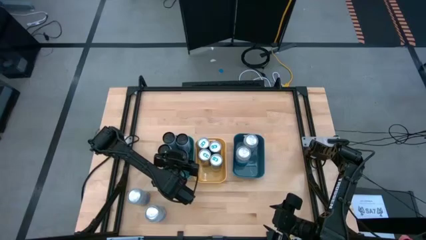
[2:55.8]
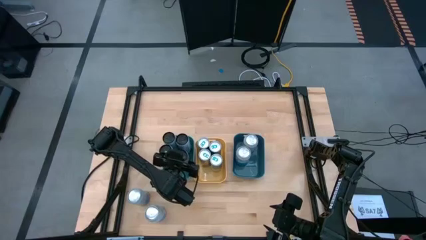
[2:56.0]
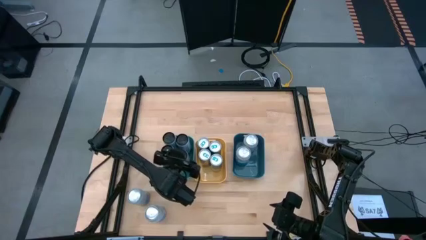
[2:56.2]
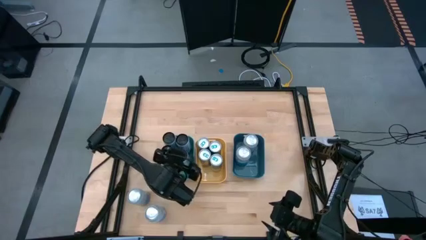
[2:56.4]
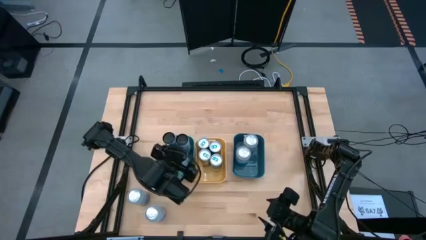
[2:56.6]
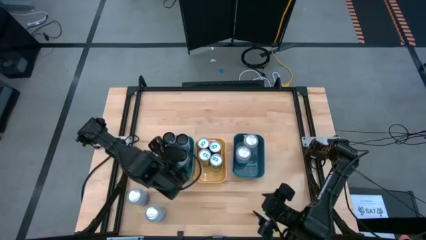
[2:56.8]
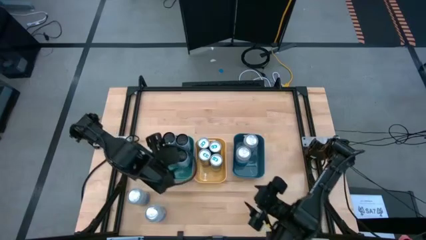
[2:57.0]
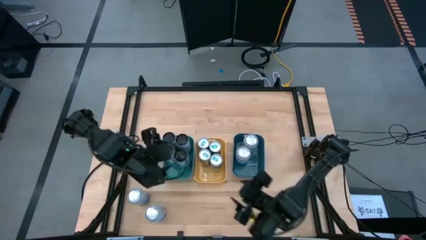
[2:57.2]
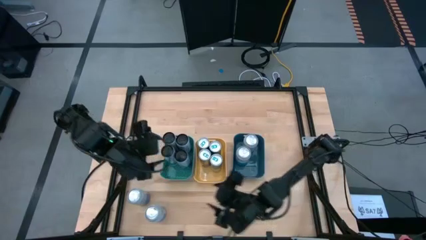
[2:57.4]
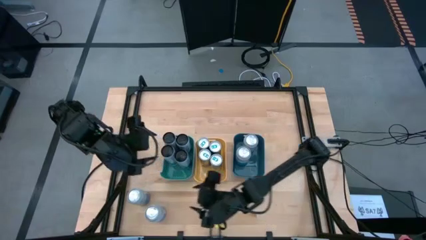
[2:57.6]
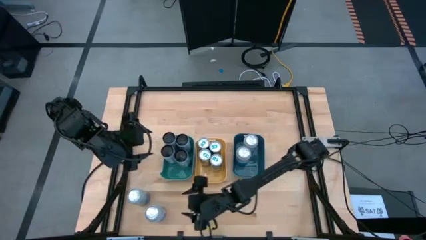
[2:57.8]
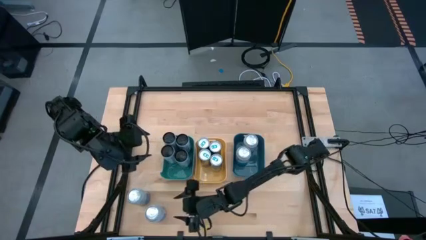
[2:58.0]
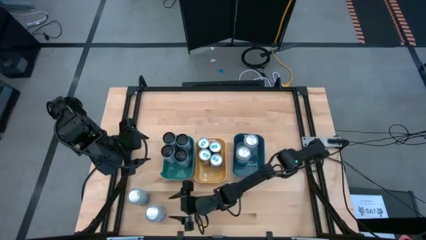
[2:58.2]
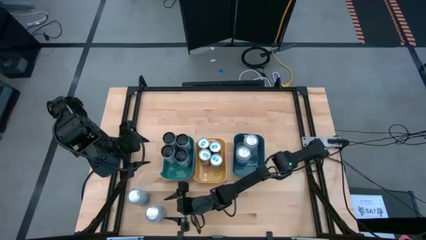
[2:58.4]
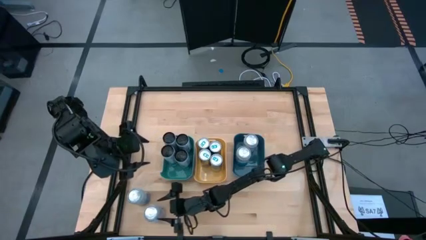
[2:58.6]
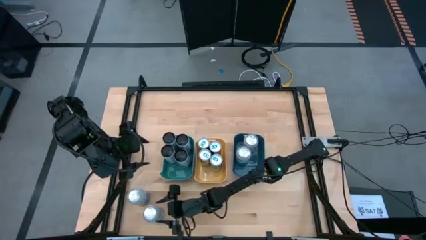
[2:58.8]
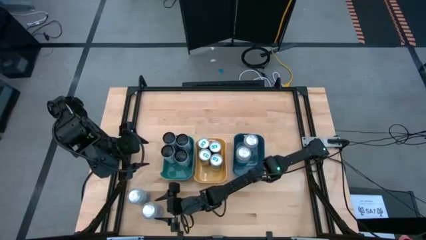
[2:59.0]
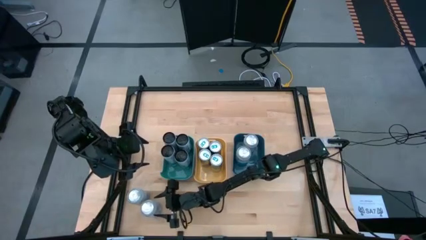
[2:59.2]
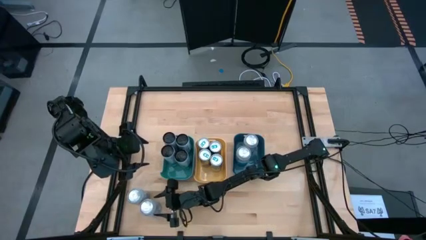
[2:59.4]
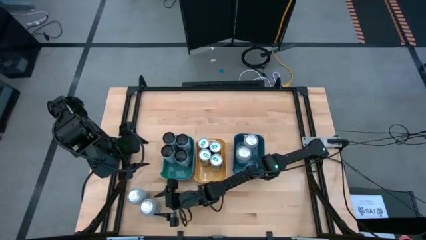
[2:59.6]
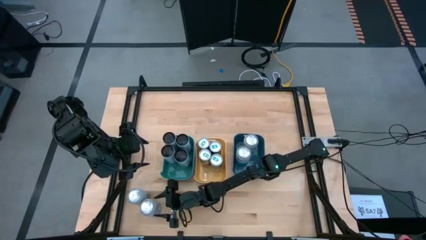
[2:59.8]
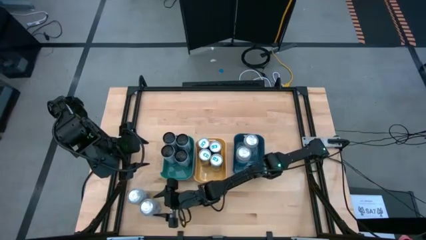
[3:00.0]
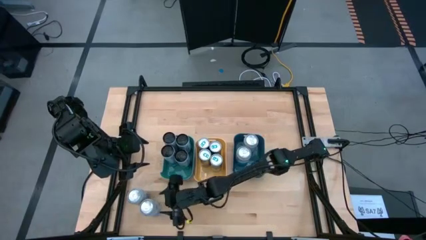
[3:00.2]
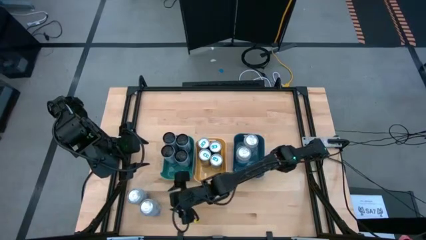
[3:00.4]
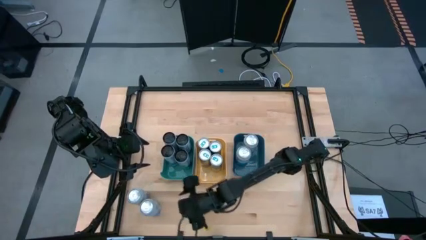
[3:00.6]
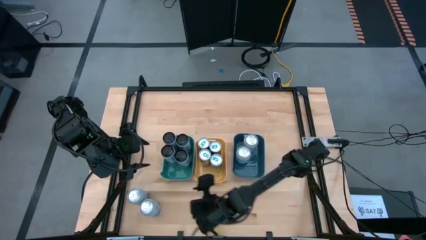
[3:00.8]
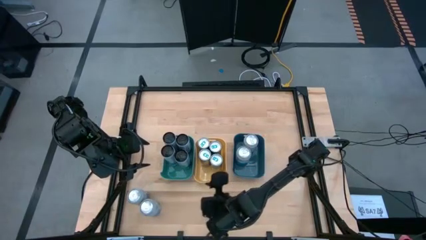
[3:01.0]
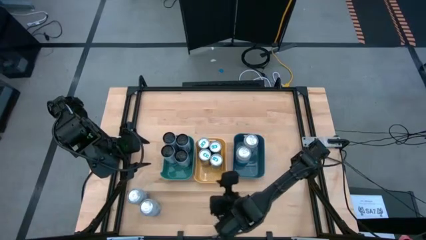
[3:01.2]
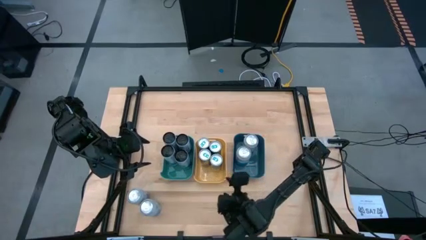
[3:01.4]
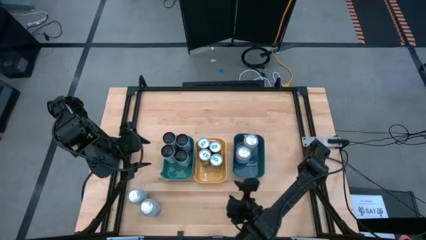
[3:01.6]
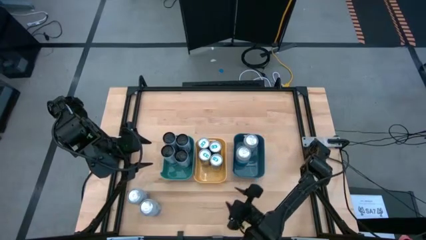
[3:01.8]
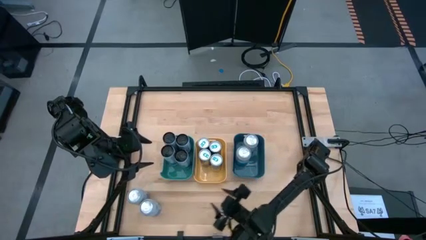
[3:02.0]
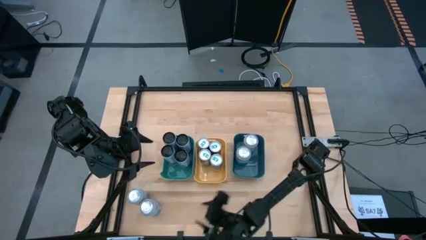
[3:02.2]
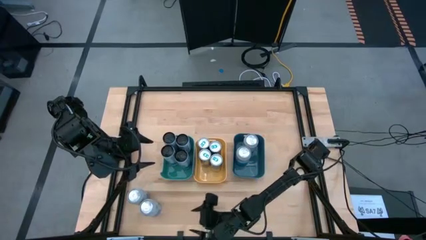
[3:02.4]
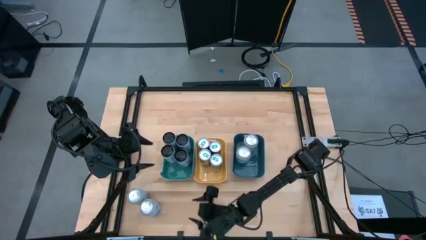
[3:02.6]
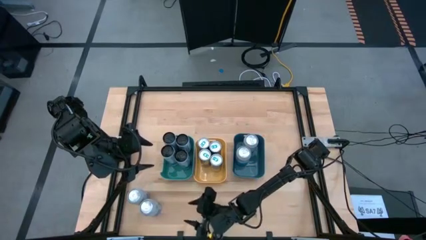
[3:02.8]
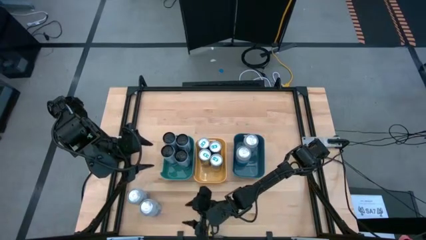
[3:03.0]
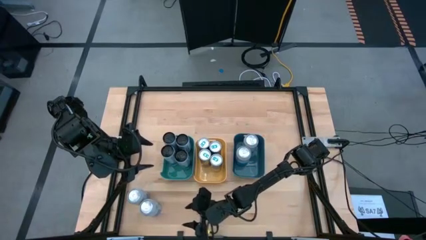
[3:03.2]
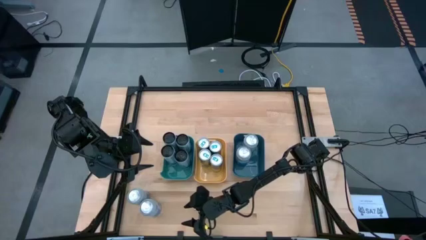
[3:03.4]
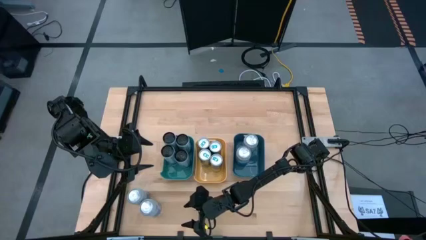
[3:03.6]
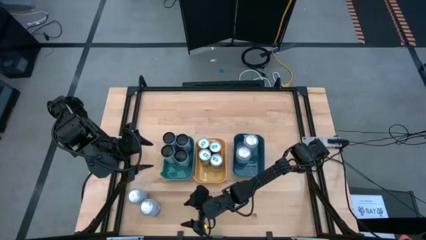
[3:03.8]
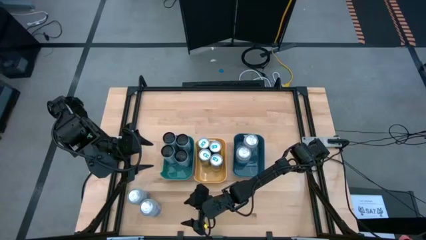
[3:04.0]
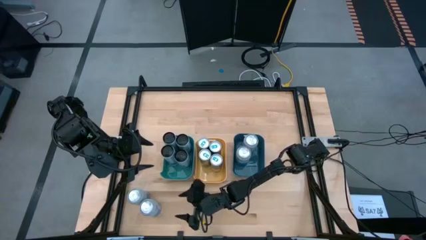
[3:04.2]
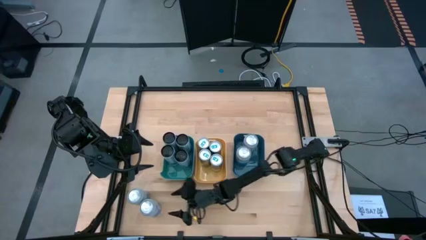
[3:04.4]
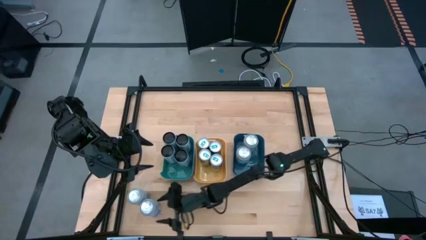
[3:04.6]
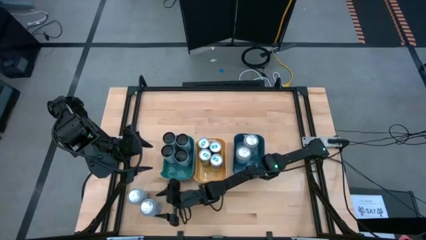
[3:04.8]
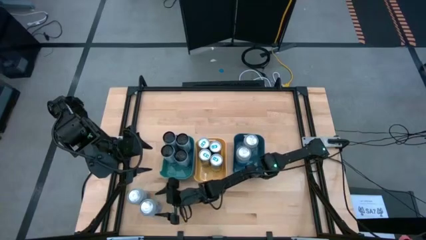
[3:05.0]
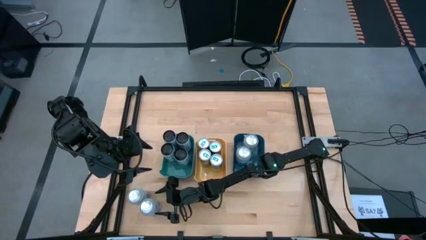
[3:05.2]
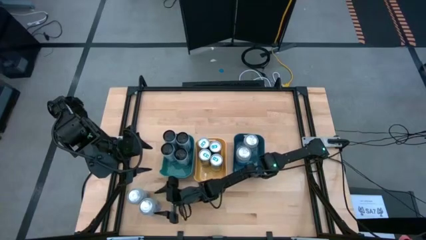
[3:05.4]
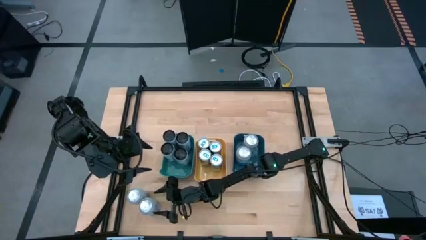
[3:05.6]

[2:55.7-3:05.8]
Task: Sort soda cans
Move the bottom right silver can to the lower middle of the table
